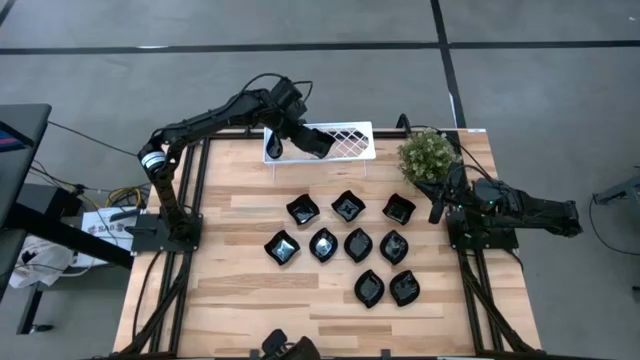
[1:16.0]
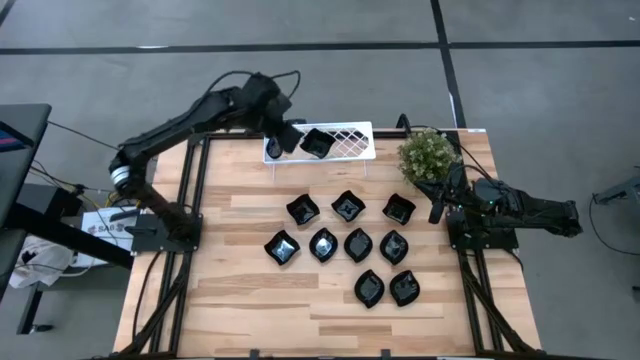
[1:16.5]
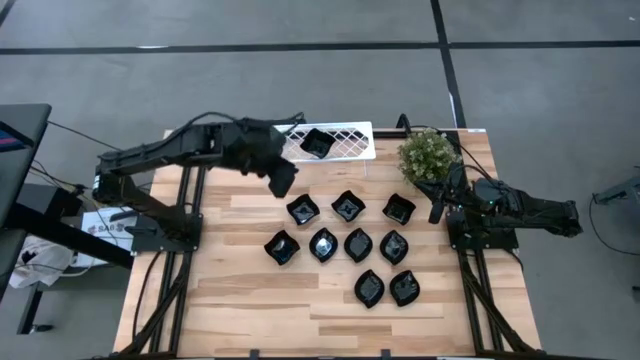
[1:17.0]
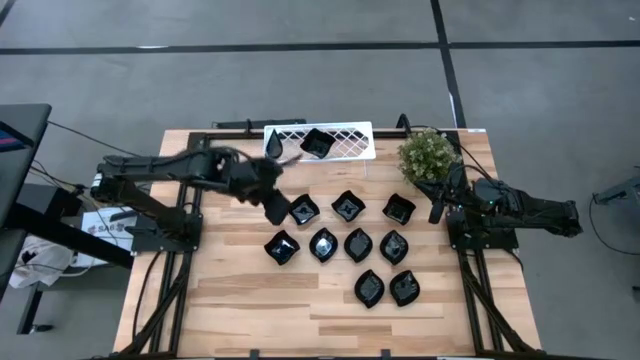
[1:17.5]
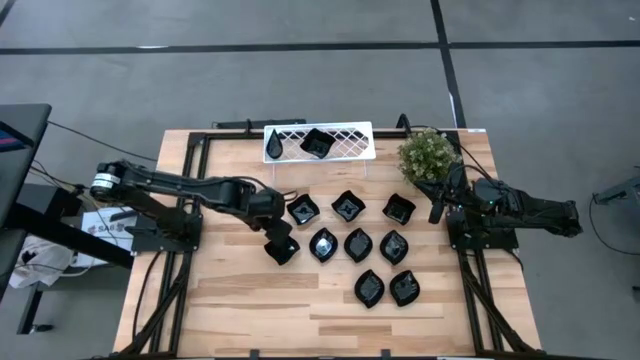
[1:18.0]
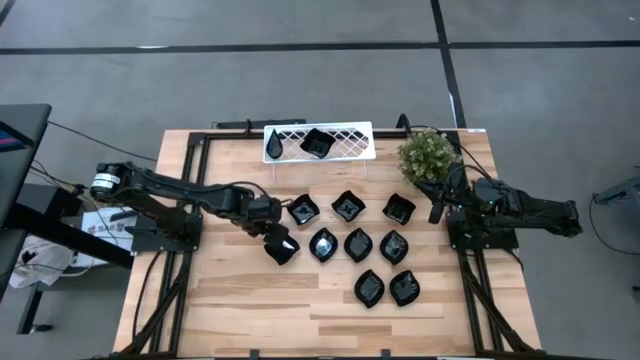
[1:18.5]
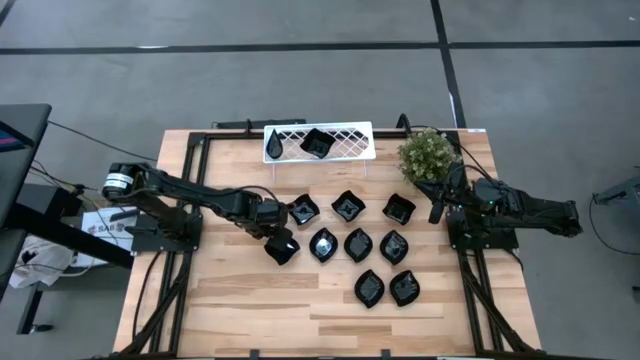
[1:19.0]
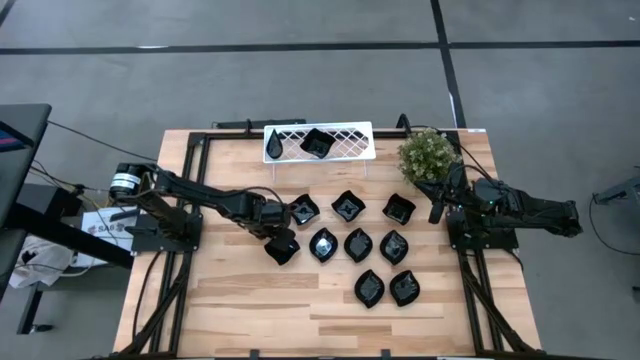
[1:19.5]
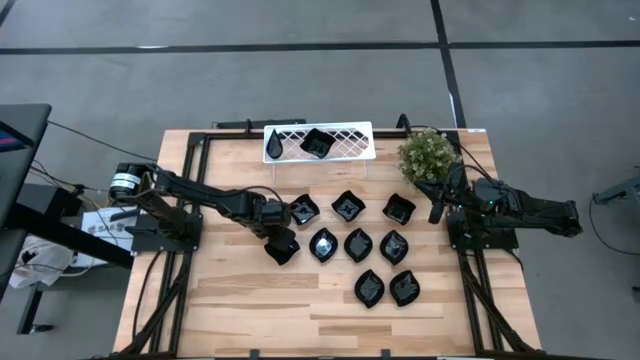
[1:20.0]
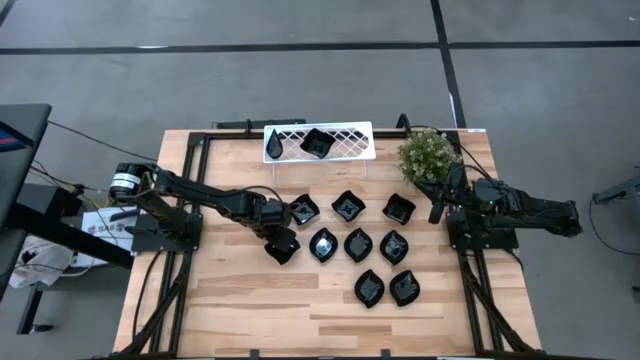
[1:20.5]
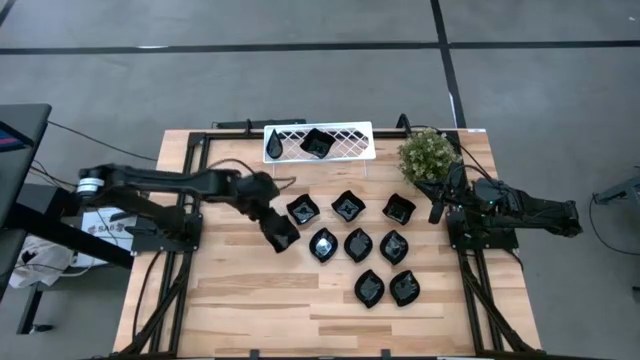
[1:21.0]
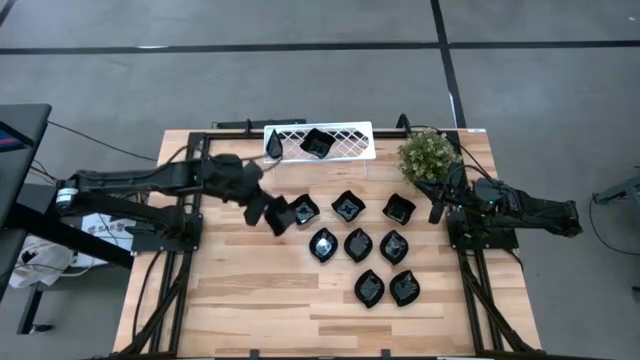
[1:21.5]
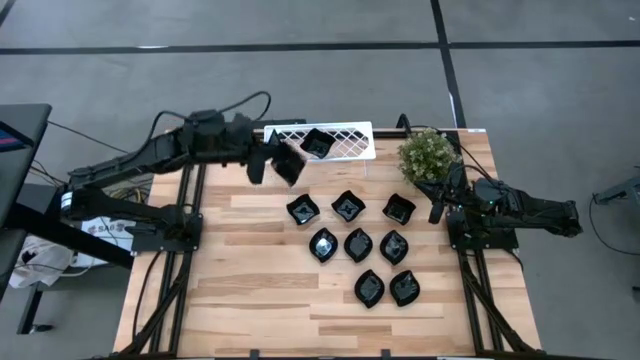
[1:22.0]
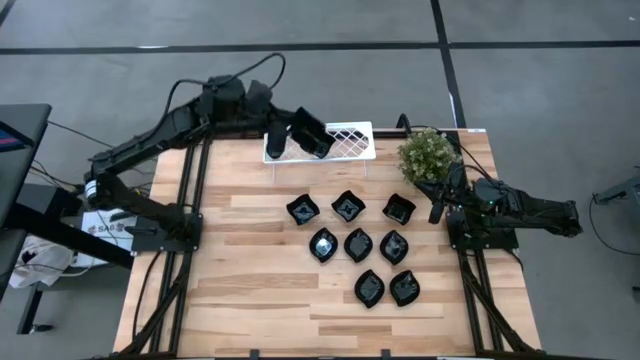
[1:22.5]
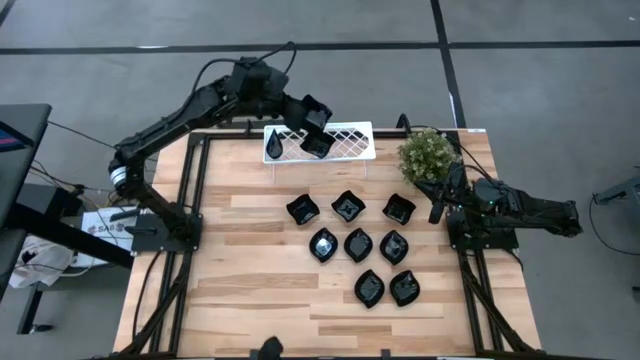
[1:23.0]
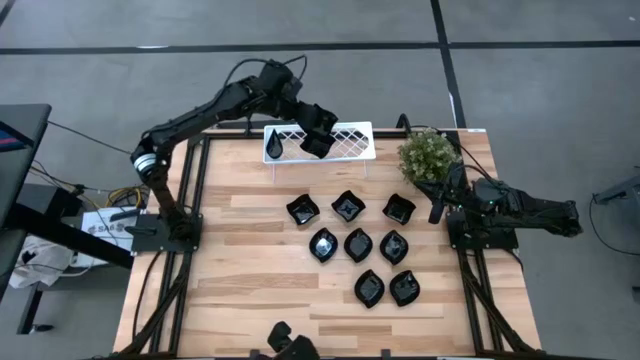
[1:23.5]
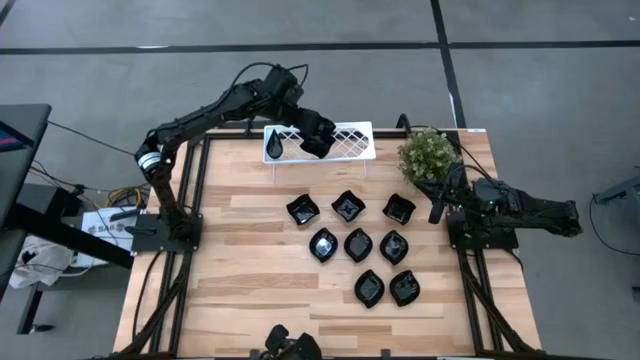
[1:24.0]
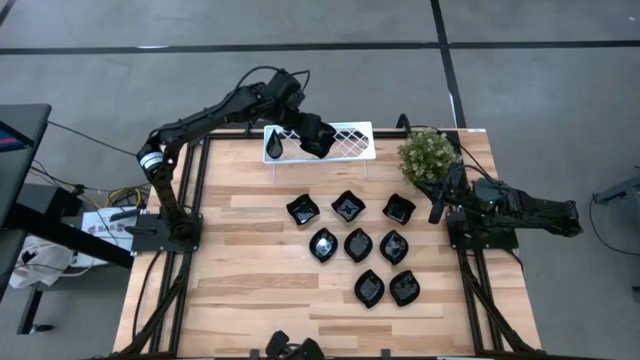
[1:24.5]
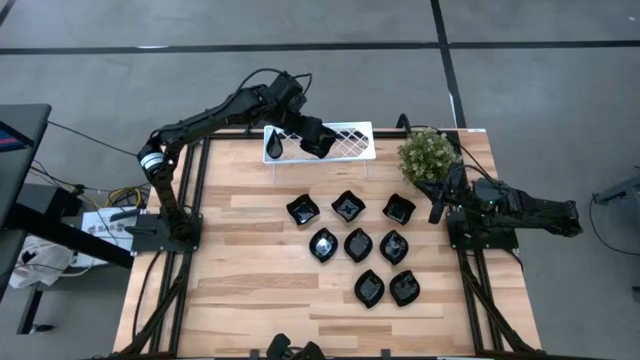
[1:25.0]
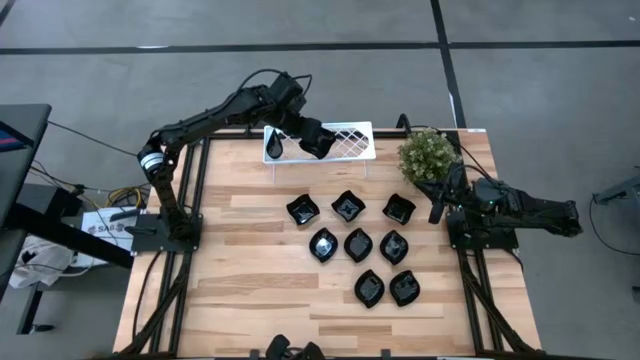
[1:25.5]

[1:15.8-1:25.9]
Task: Pick & Place Mini shaped plates
Stack the black distorted square plate on top of the black distorted square plate on the shelf

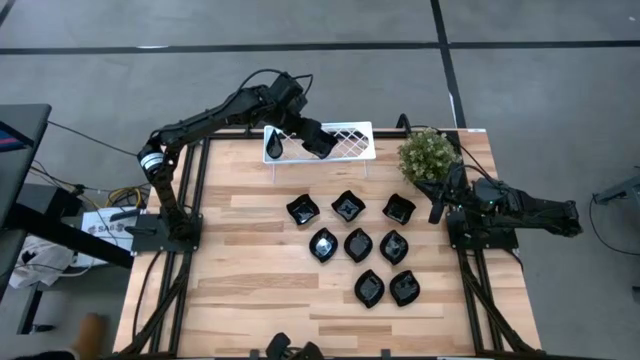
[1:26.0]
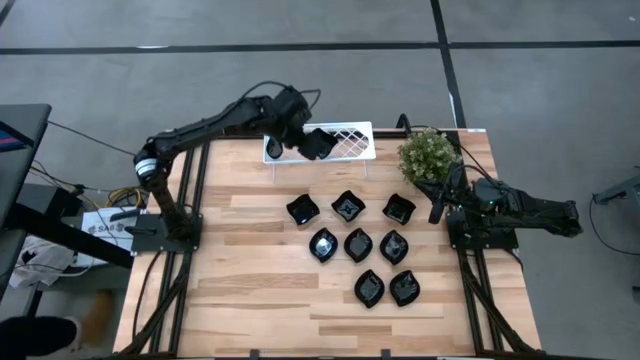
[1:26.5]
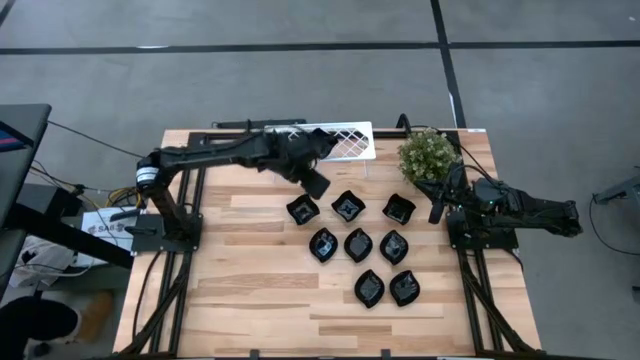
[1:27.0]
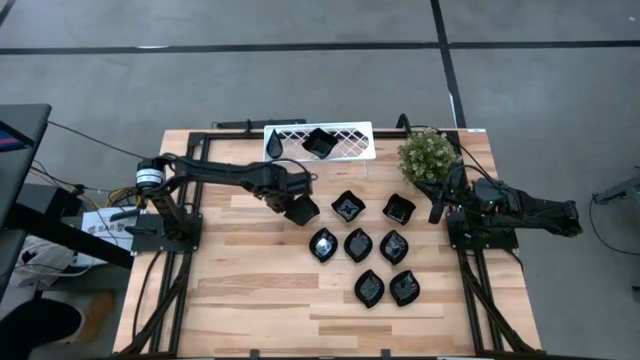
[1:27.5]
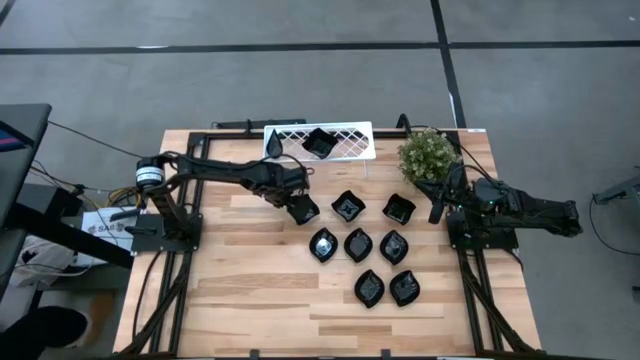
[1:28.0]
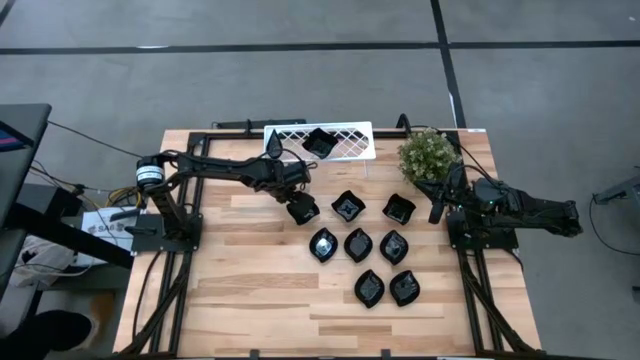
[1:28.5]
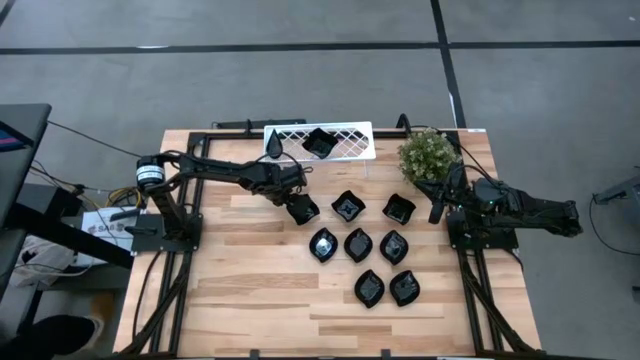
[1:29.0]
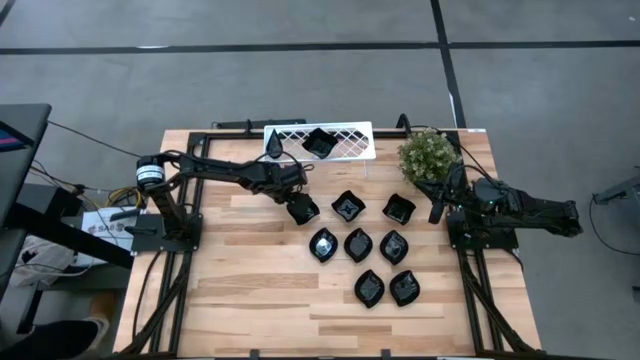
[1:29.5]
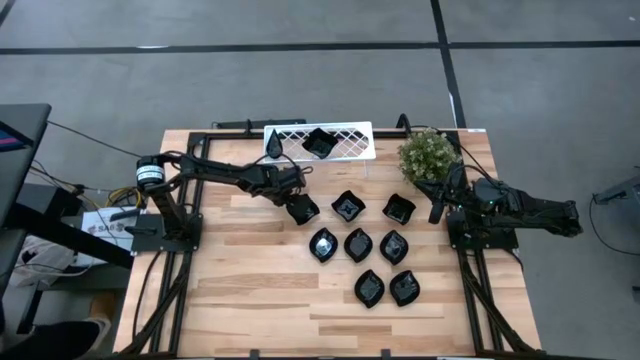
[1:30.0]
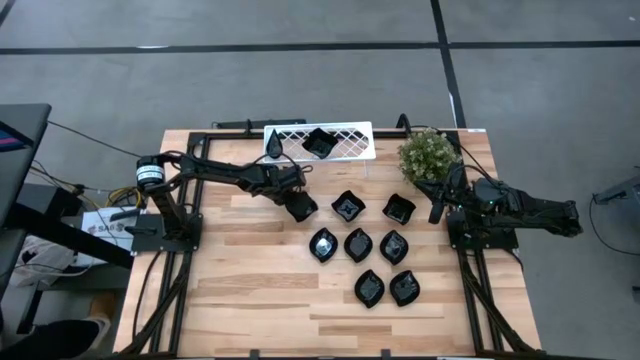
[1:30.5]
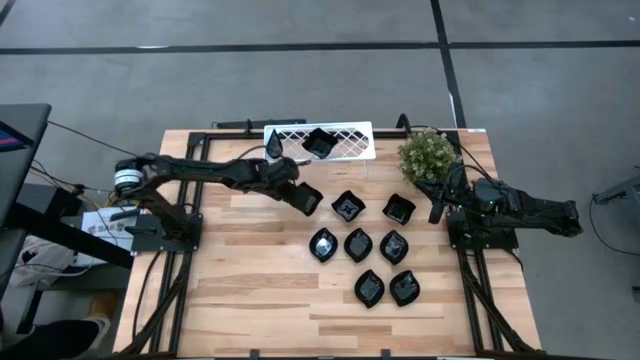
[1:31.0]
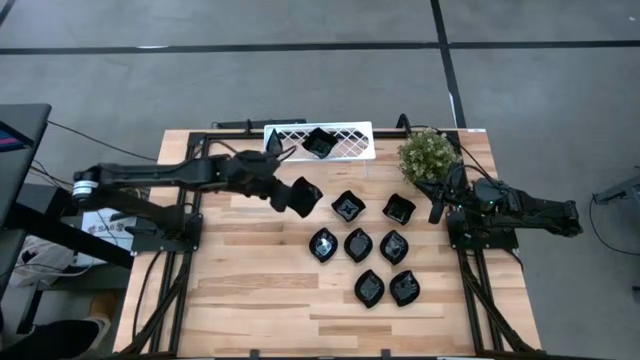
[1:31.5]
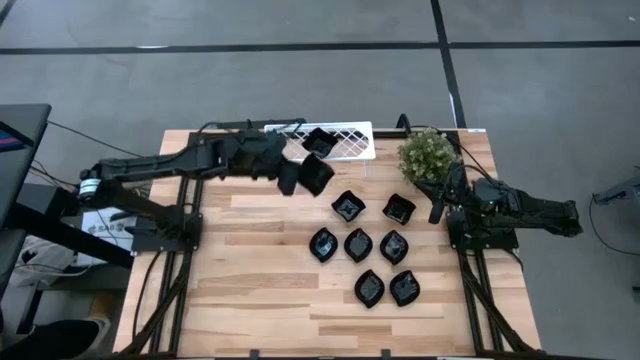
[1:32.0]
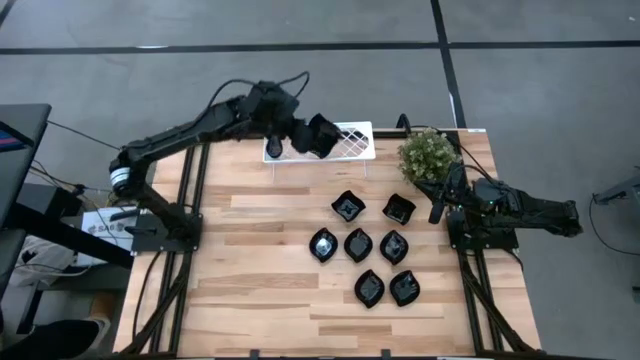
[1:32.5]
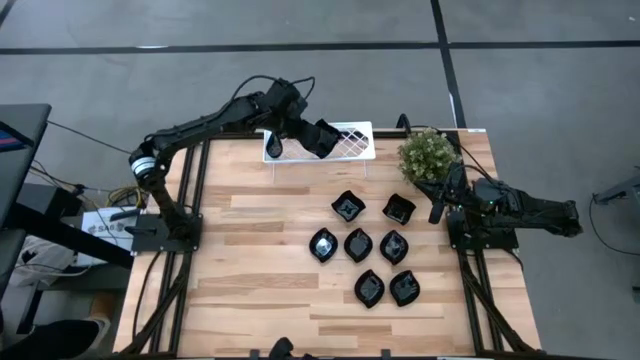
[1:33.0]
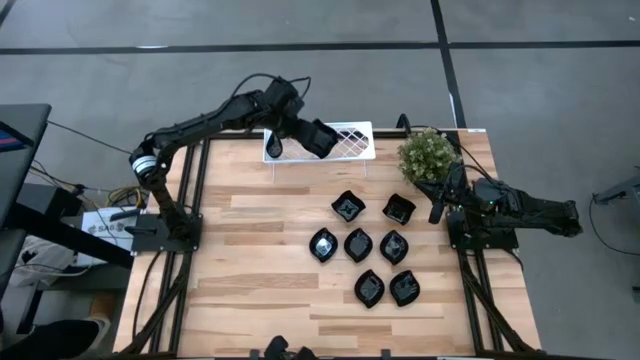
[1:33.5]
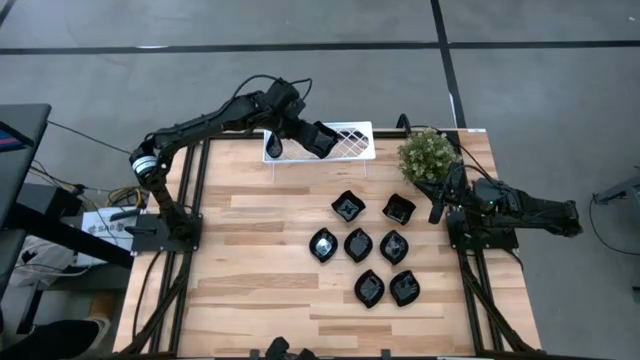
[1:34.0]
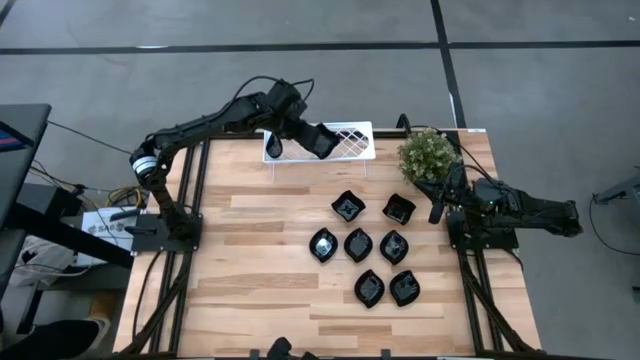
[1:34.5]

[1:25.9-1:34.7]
Stack the black distorted square plate on top of the black distorted square plates on the shelf

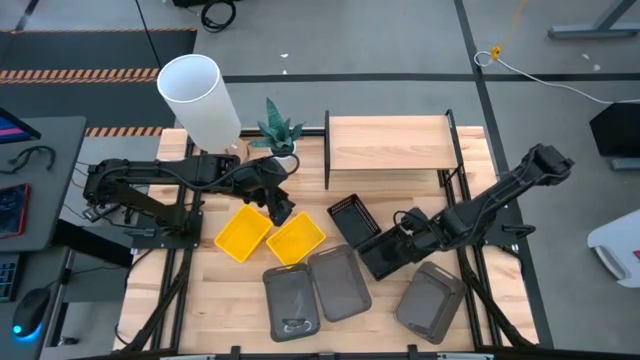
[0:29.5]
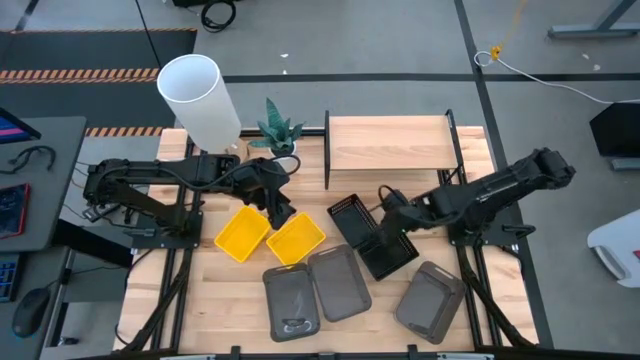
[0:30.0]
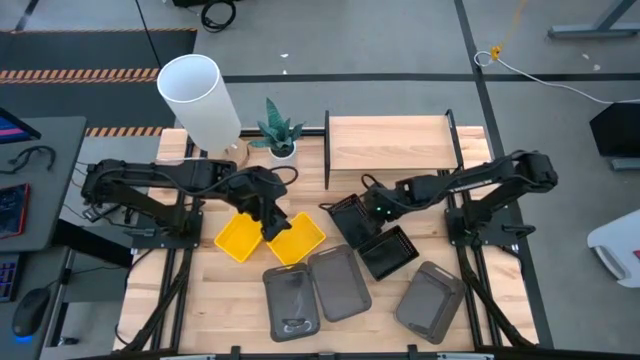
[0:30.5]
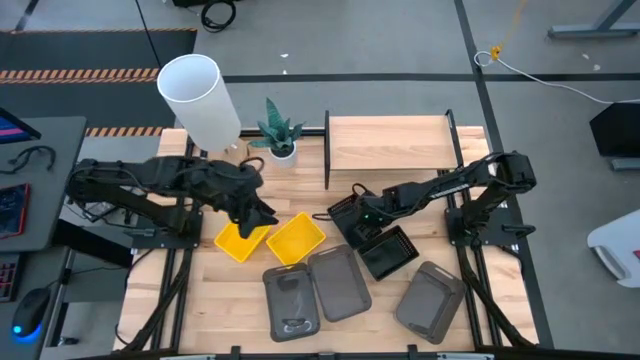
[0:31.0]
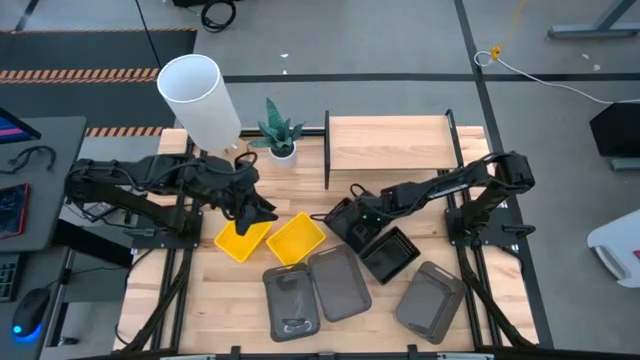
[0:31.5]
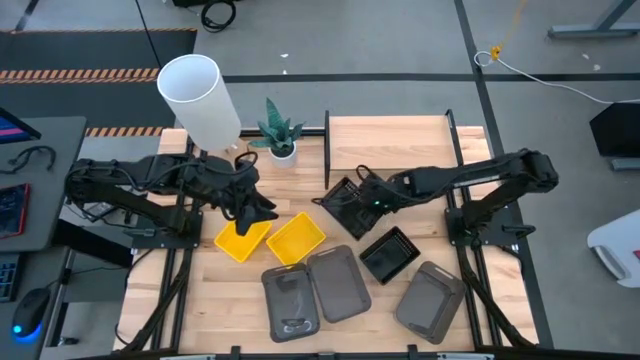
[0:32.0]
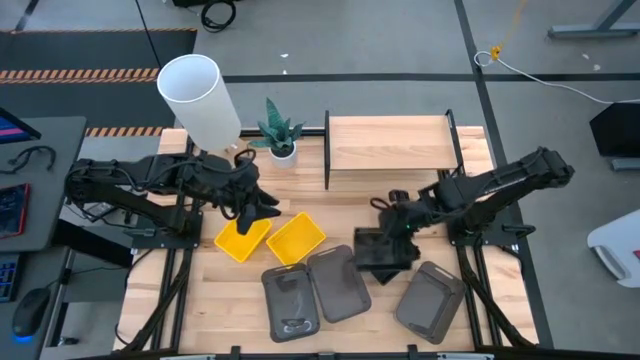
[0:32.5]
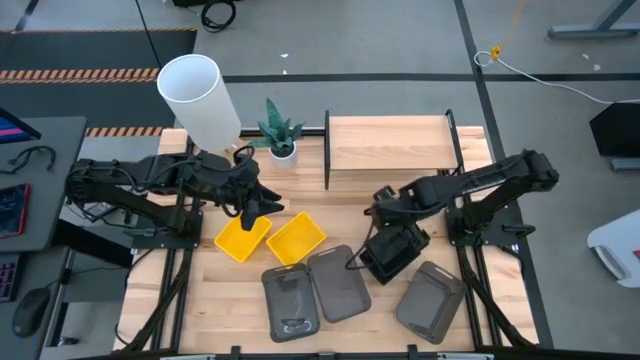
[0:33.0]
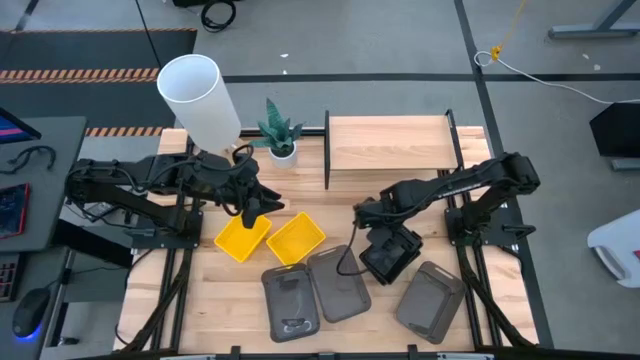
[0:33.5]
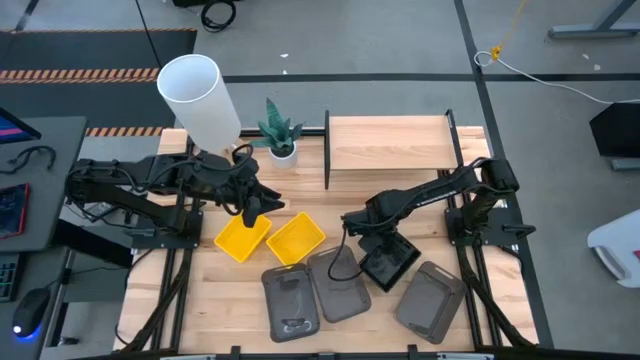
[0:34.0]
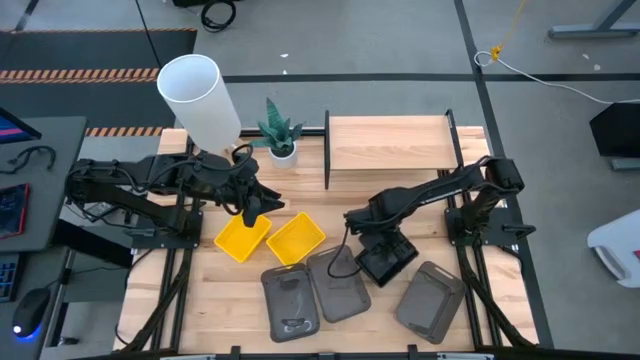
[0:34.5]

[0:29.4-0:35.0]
Task: Stack baskets on shelf by color
Stack the black bin on top of the bottom black bin
